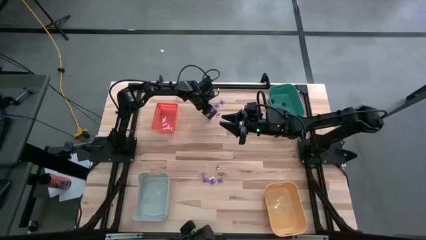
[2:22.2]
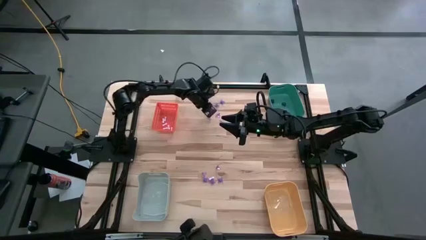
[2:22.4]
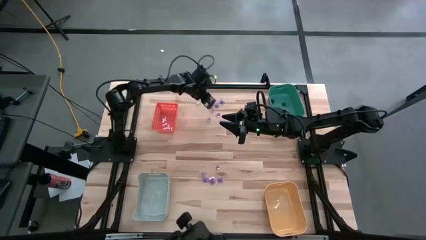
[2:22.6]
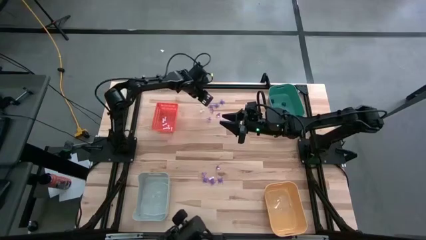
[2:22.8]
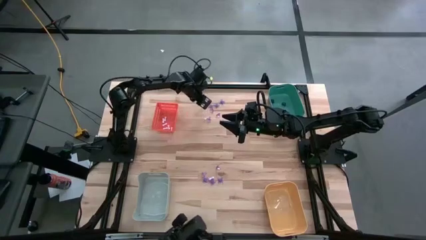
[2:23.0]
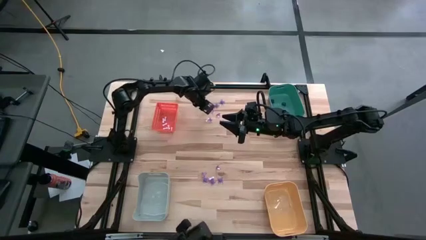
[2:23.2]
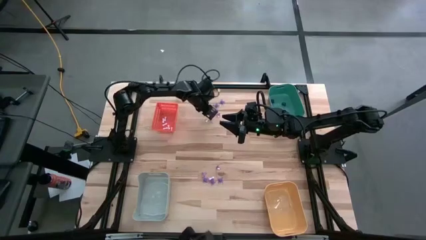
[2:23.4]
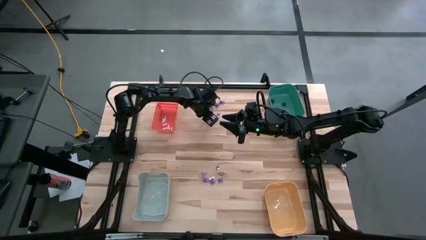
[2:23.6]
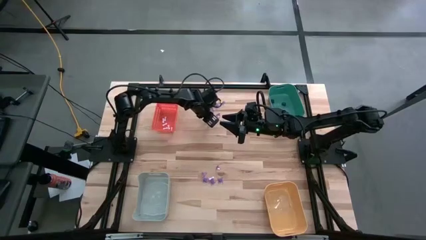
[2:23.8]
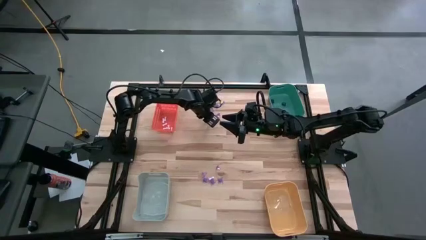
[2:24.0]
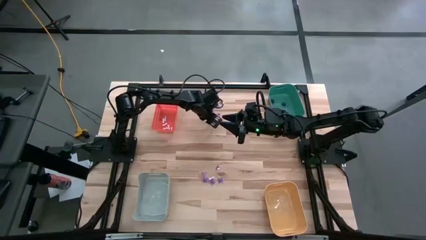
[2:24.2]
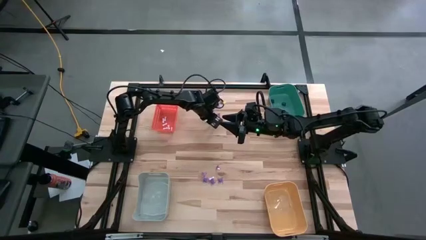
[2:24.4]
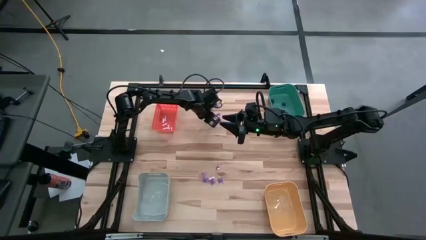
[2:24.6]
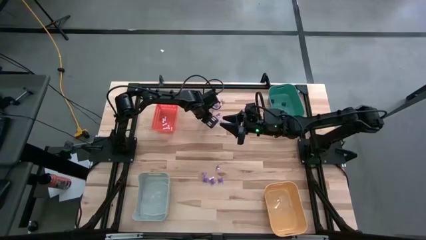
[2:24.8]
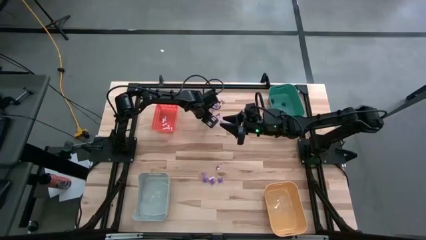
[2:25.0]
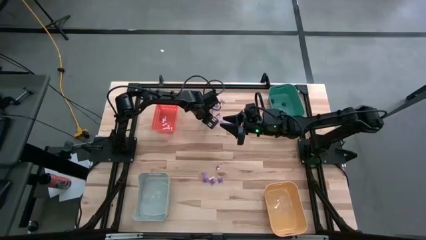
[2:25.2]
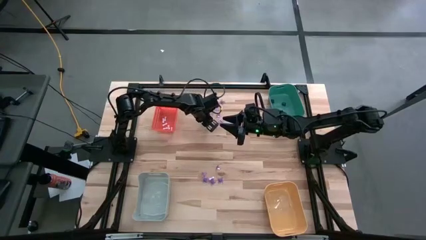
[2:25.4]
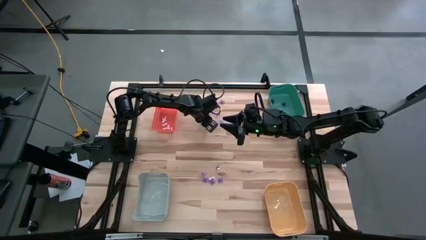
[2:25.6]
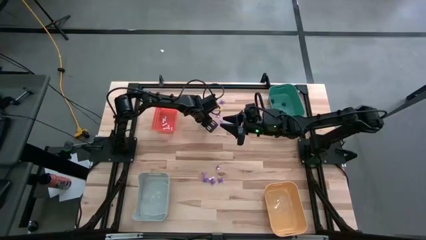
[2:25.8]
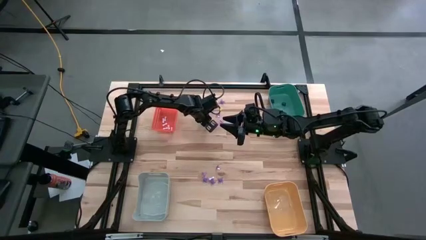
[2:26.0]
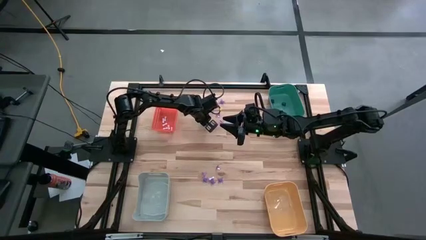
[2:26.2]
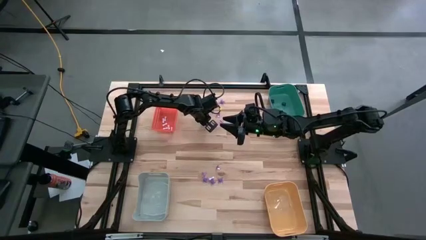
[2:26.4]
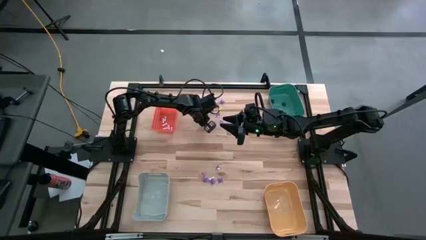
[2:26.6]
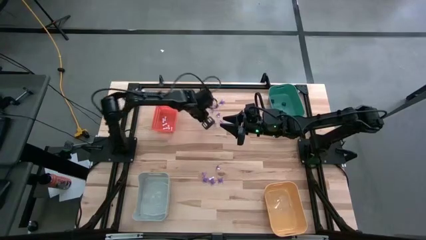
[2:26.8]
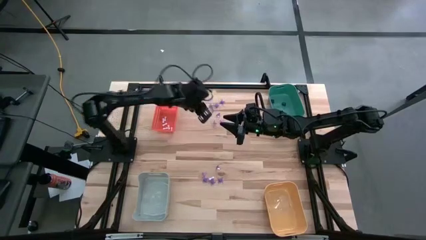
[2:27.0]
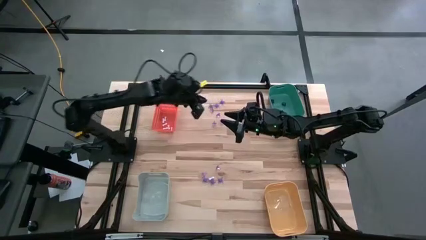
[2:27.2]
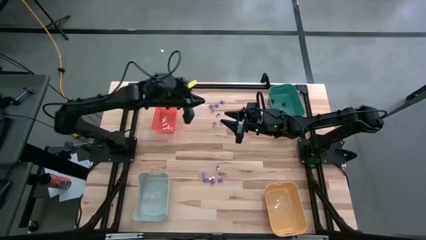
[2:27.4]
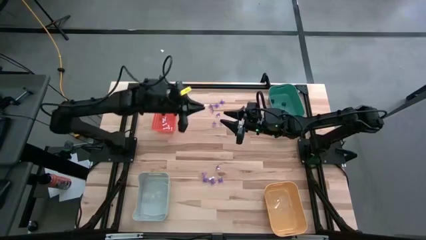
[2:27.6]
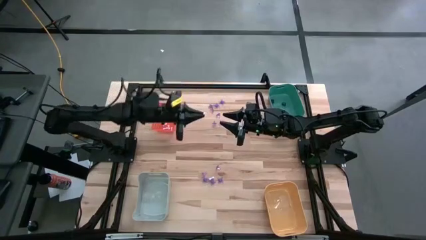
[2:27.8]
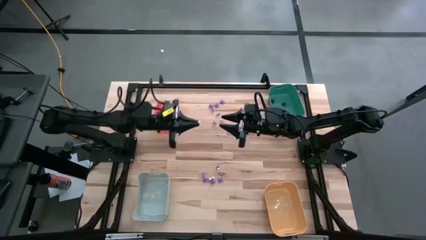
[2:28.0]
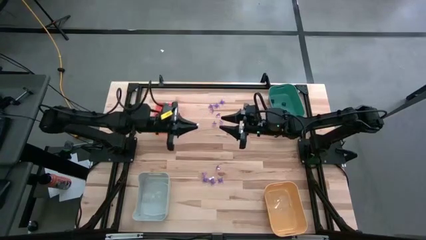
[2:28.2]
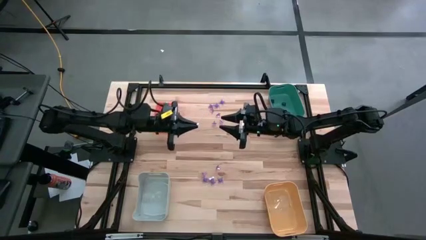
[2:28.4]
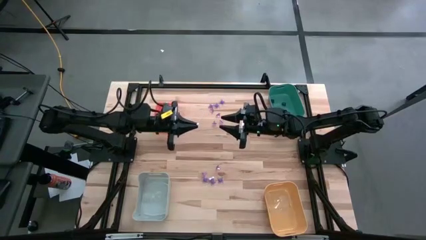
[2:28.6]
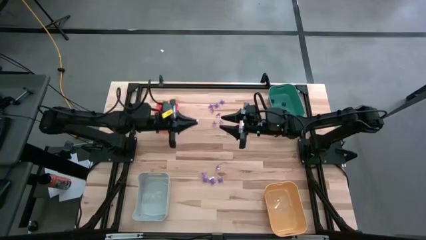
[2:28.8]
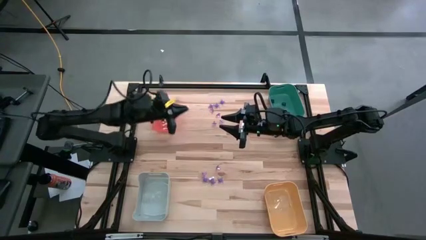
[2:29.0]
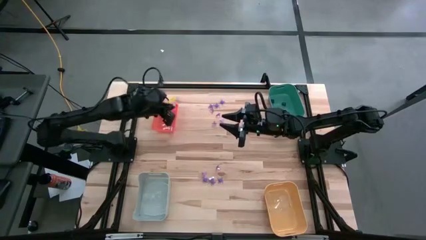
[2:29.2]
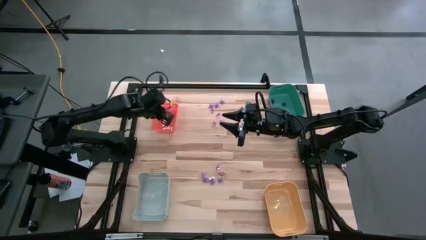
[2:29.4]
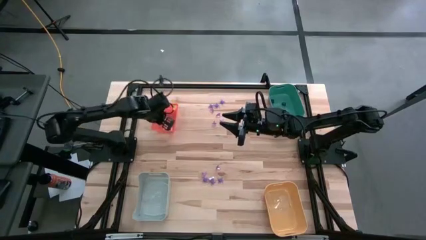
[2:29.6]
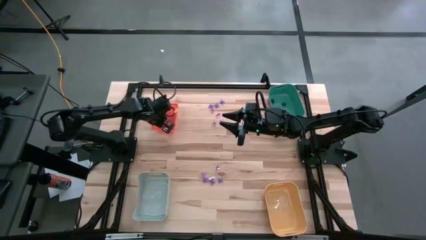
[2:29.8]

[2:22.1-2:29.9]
Task: Sort Halloween decoration
Put the white bone toy into the orange bin

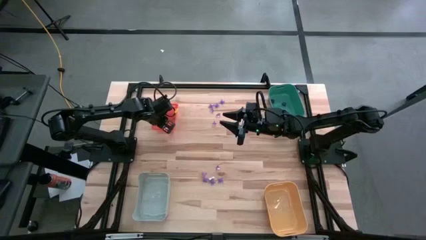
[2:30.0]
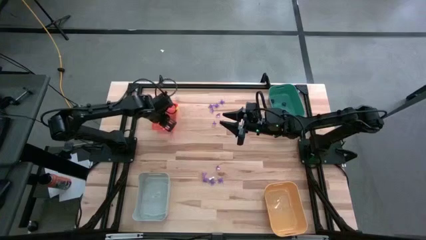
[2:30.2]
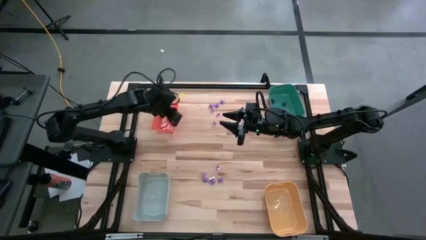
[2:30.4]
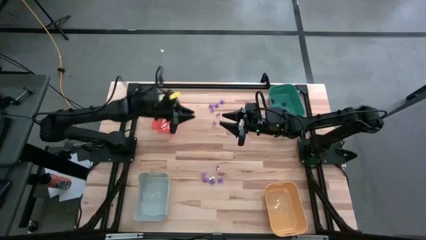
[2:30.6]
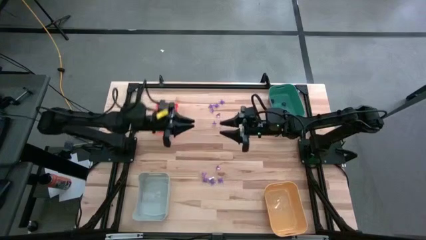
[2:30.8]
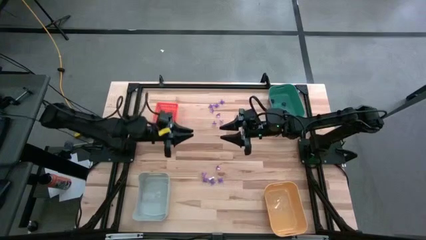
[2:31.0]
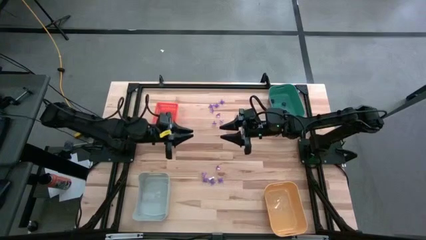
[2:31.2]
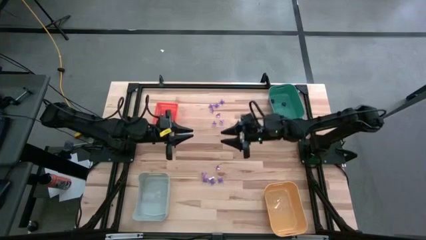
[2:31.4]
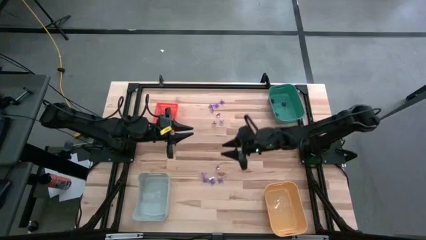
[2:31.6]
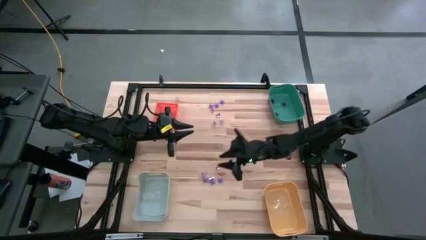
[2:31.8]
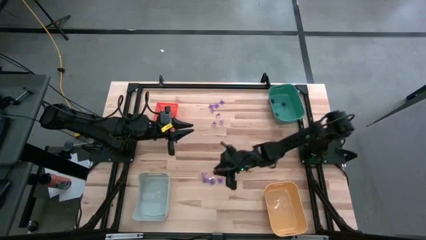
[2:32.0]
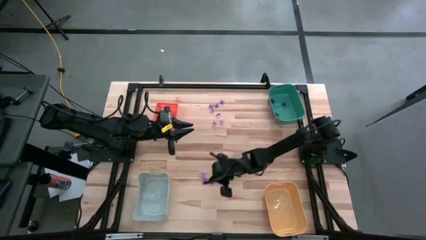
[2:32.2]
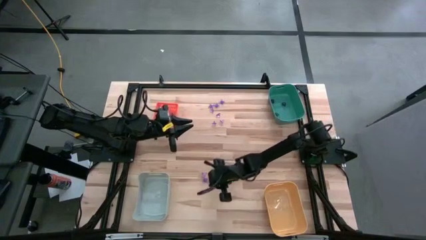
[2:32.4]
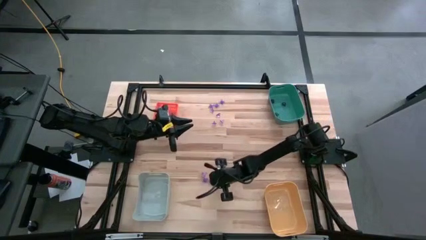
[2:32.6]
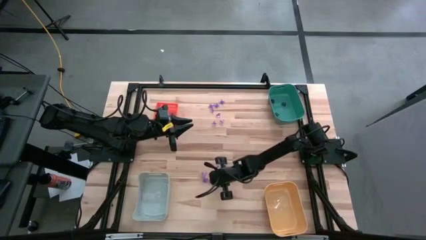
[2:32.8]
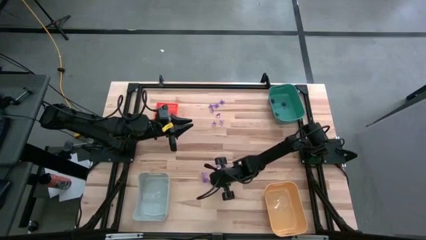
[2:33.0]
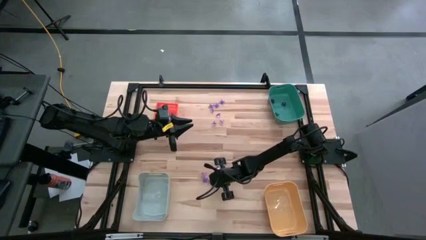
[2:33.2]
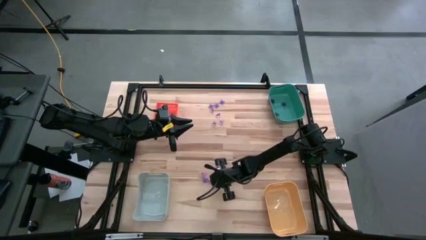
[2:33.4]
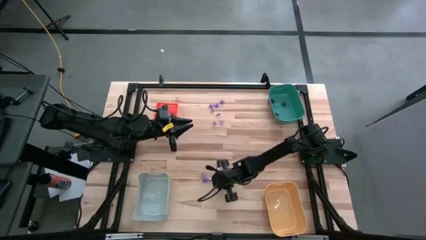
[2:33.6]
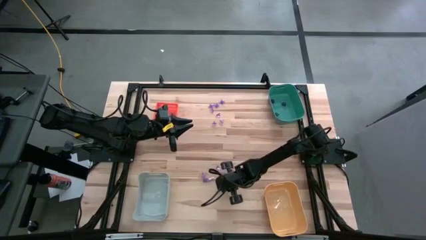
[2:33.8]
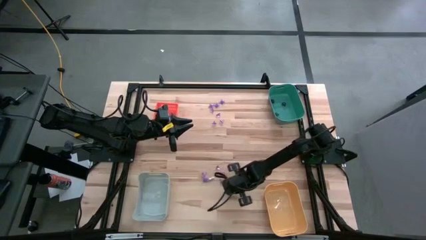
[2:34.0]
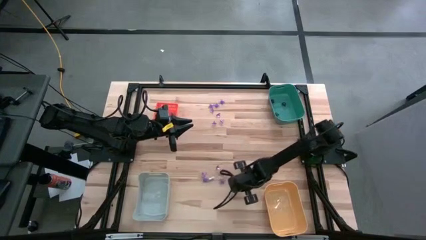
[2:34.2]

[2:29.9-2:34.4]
Adjust the violet spider toy
